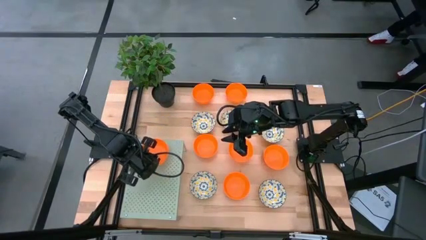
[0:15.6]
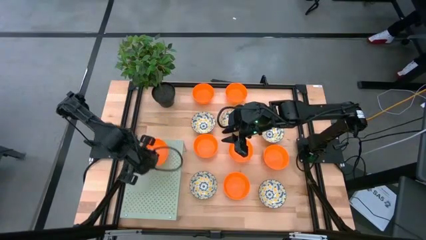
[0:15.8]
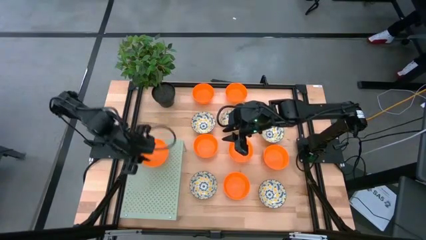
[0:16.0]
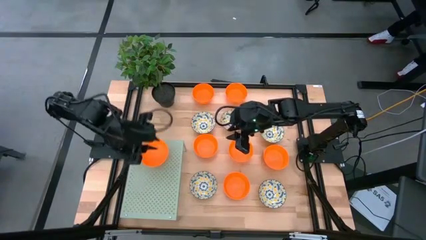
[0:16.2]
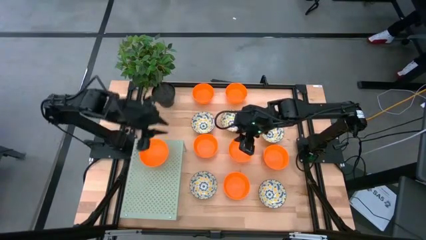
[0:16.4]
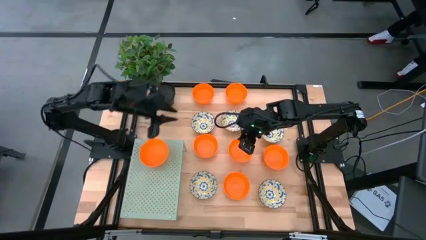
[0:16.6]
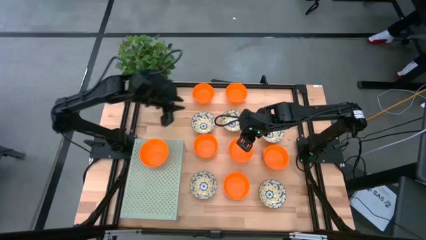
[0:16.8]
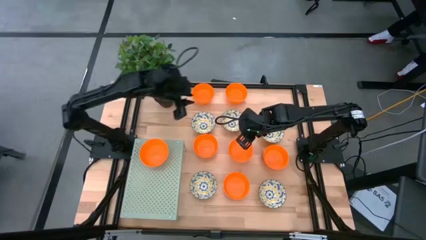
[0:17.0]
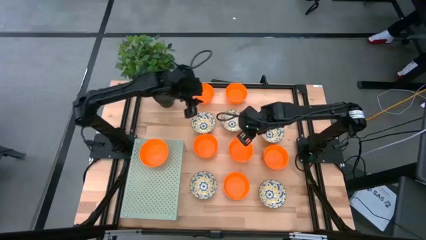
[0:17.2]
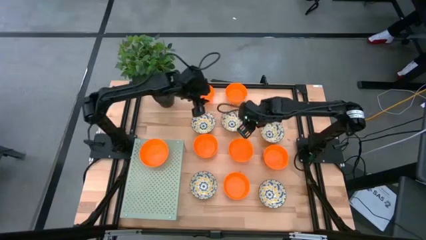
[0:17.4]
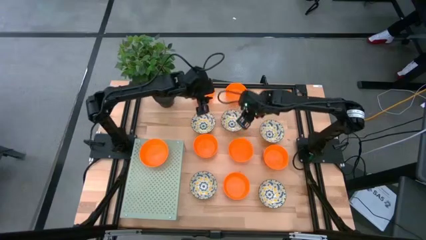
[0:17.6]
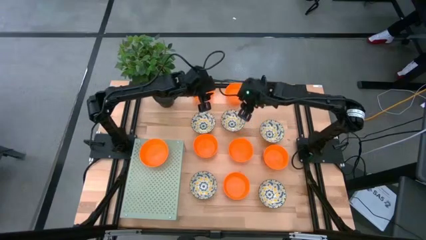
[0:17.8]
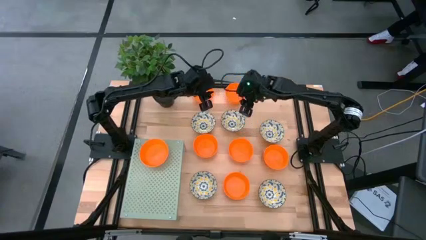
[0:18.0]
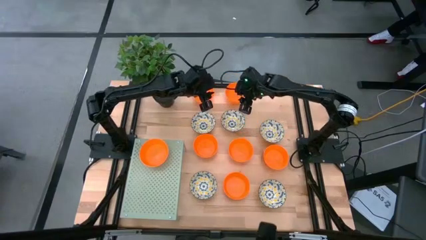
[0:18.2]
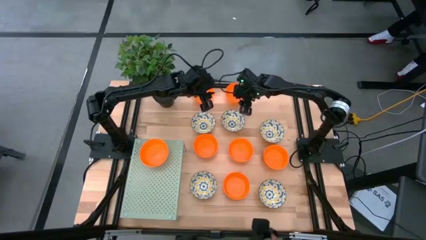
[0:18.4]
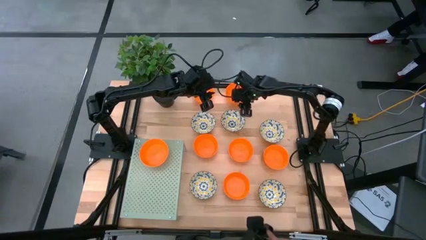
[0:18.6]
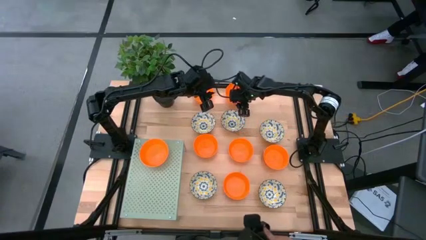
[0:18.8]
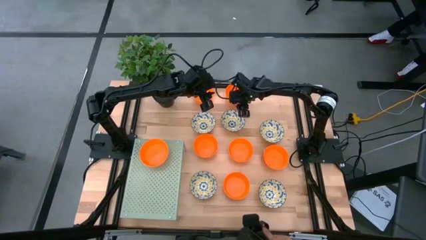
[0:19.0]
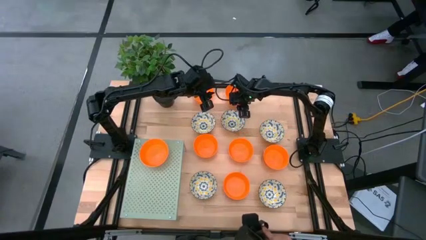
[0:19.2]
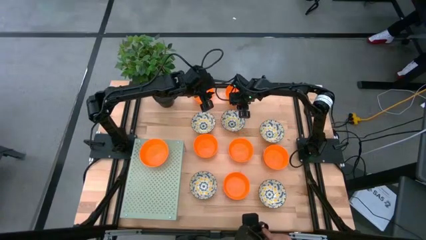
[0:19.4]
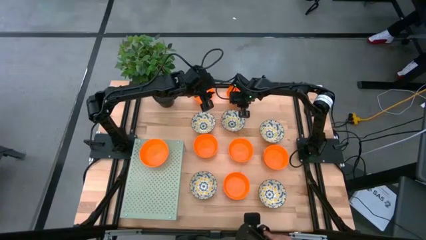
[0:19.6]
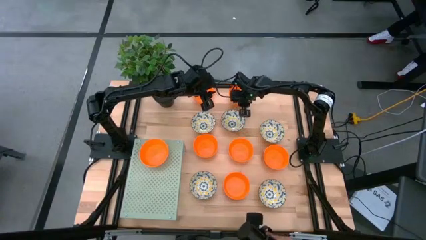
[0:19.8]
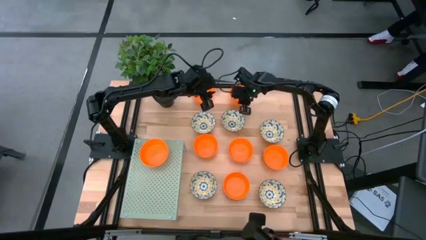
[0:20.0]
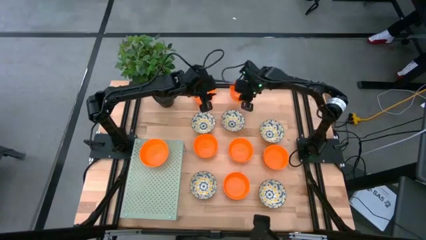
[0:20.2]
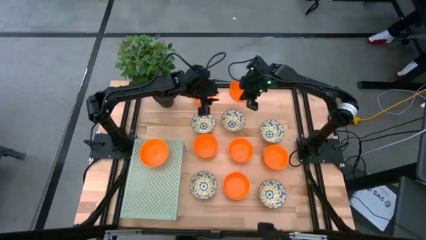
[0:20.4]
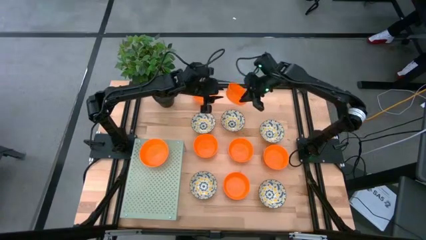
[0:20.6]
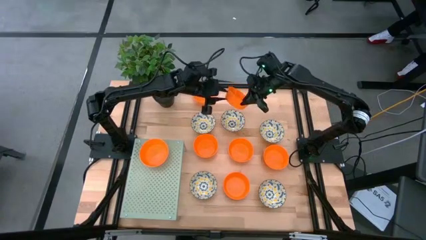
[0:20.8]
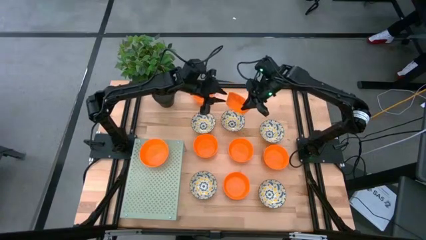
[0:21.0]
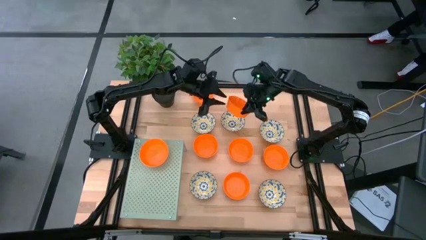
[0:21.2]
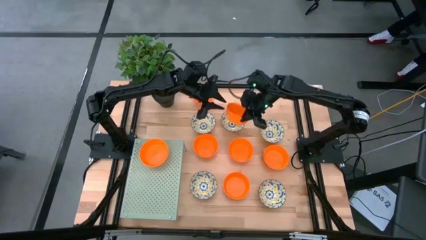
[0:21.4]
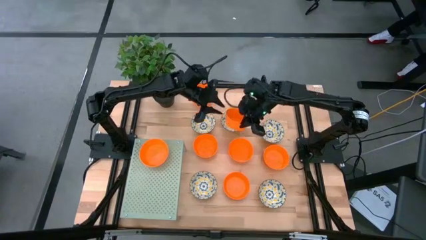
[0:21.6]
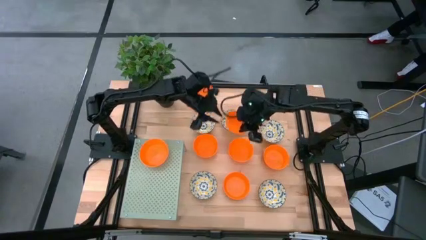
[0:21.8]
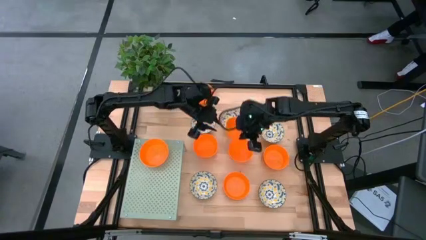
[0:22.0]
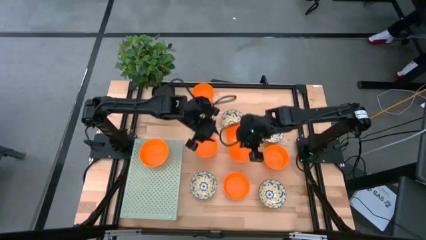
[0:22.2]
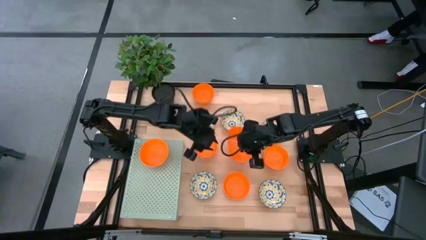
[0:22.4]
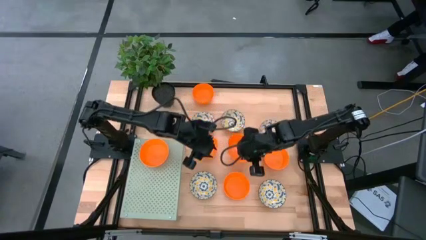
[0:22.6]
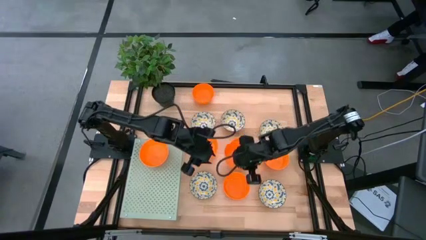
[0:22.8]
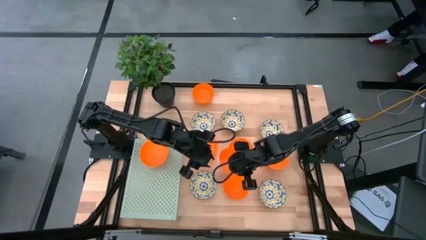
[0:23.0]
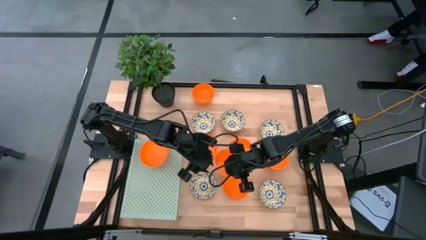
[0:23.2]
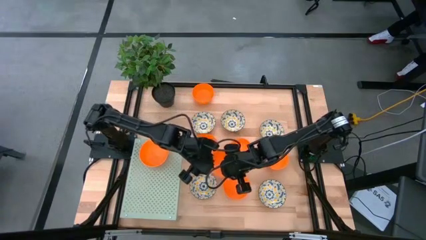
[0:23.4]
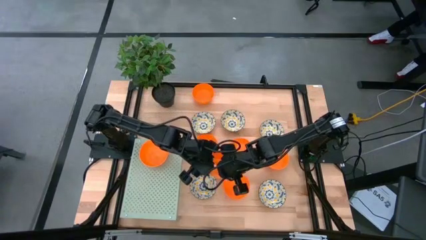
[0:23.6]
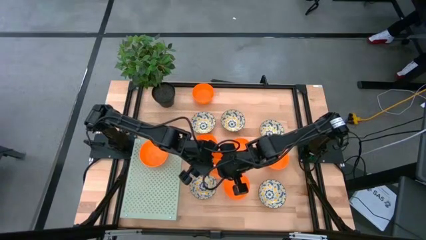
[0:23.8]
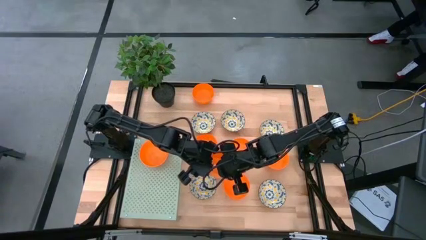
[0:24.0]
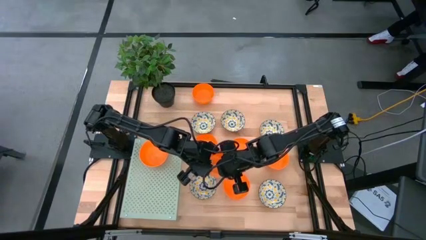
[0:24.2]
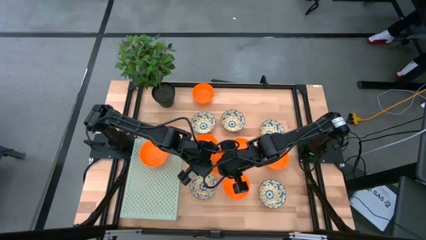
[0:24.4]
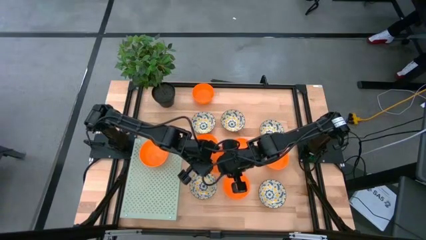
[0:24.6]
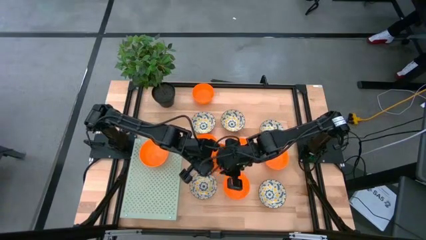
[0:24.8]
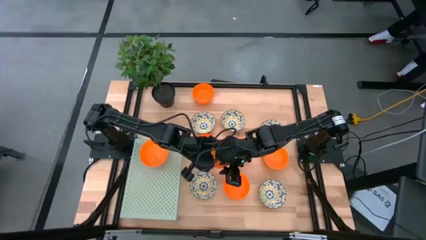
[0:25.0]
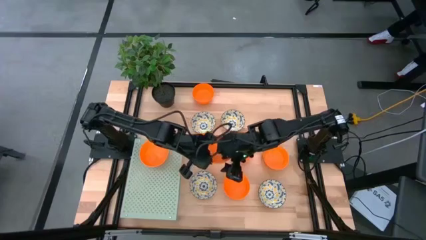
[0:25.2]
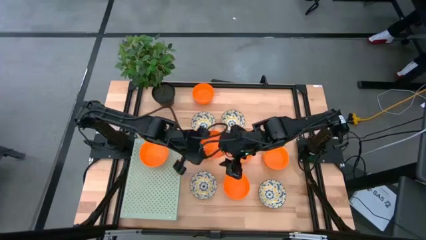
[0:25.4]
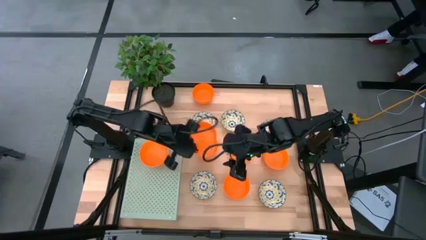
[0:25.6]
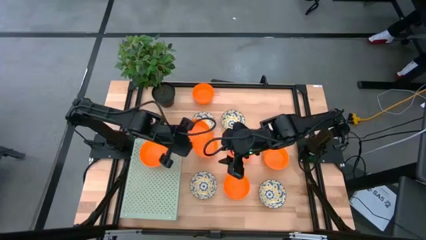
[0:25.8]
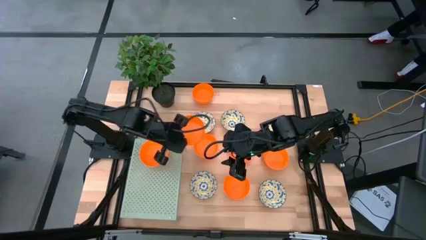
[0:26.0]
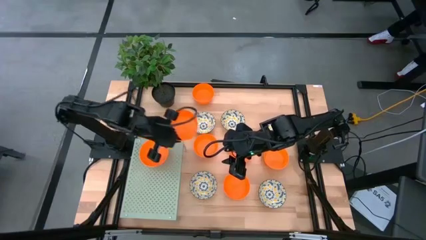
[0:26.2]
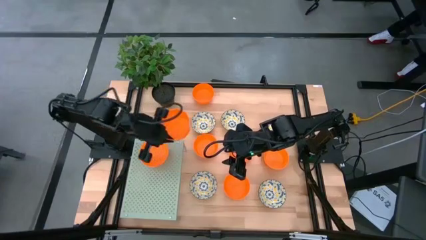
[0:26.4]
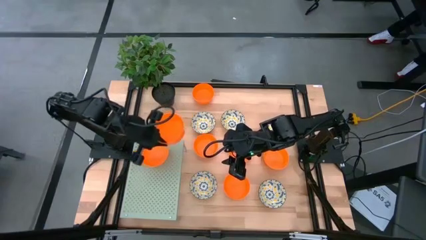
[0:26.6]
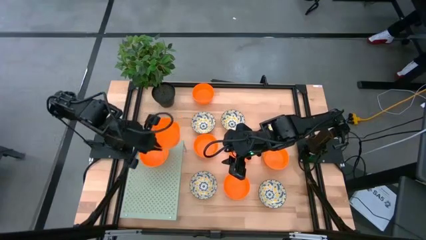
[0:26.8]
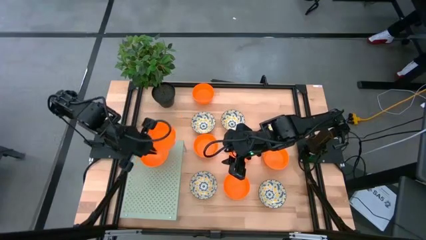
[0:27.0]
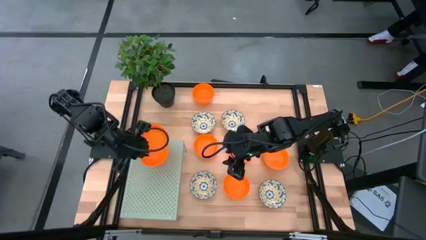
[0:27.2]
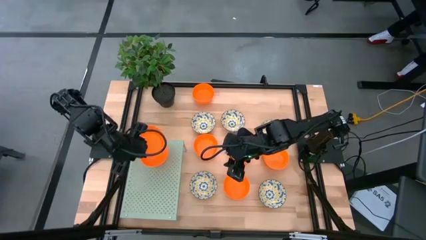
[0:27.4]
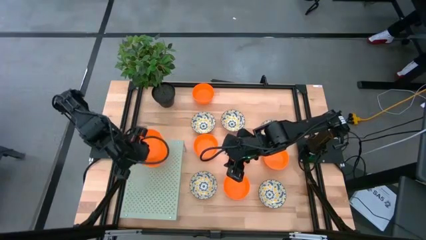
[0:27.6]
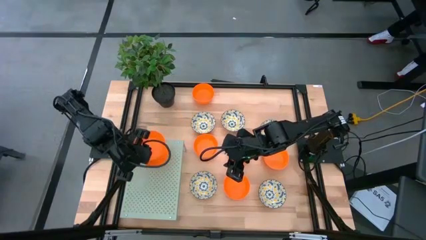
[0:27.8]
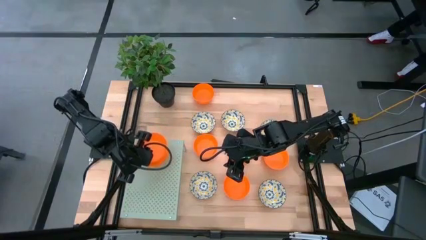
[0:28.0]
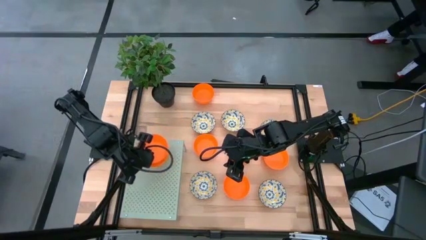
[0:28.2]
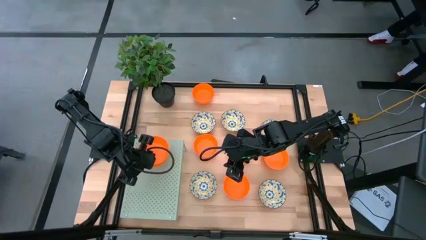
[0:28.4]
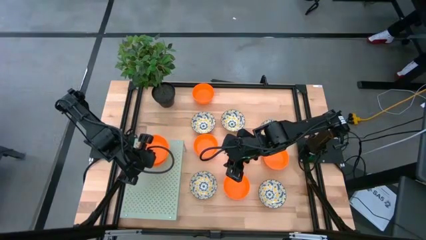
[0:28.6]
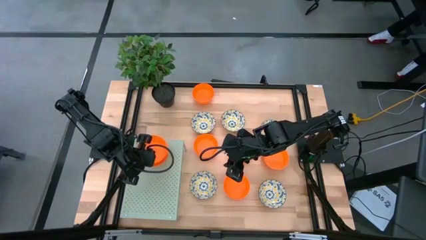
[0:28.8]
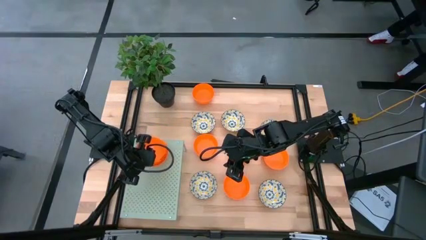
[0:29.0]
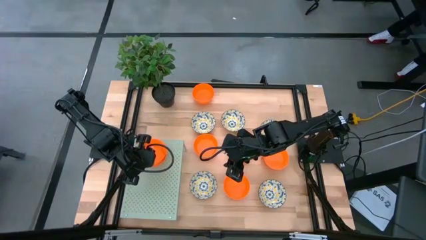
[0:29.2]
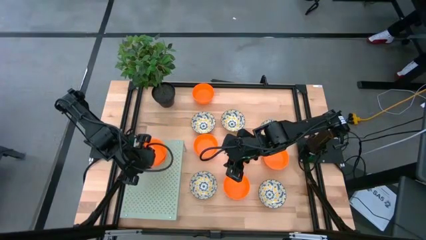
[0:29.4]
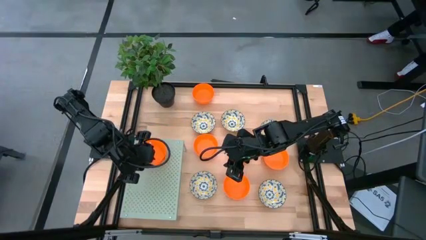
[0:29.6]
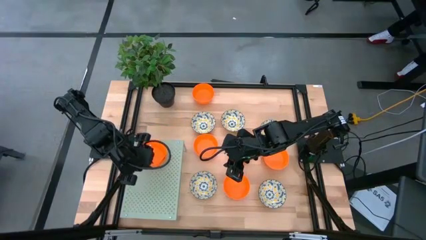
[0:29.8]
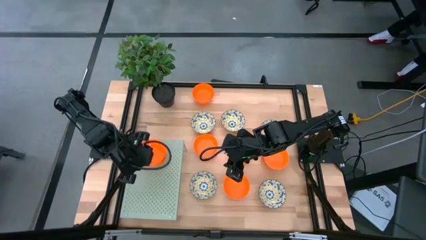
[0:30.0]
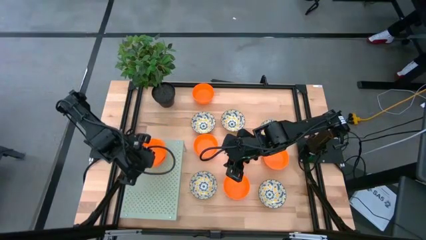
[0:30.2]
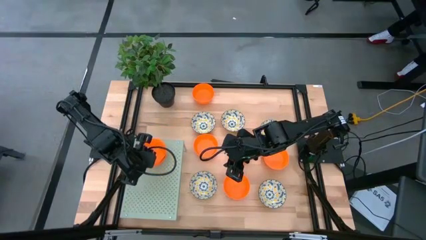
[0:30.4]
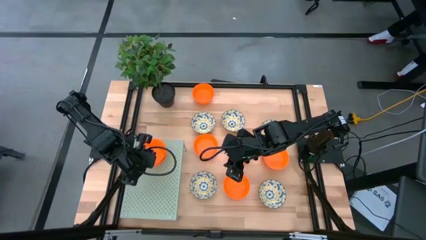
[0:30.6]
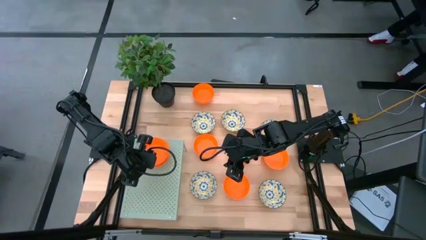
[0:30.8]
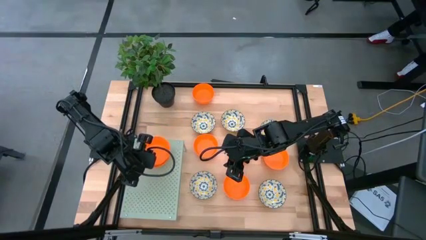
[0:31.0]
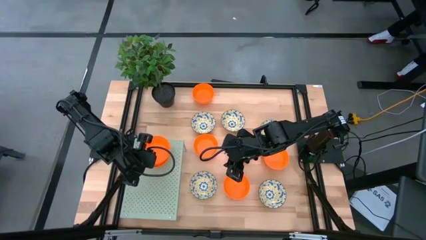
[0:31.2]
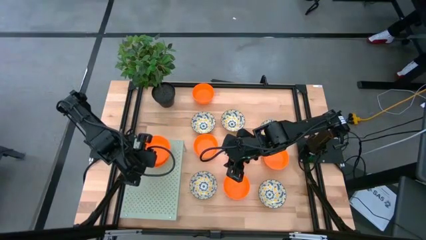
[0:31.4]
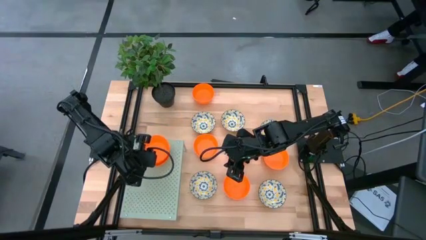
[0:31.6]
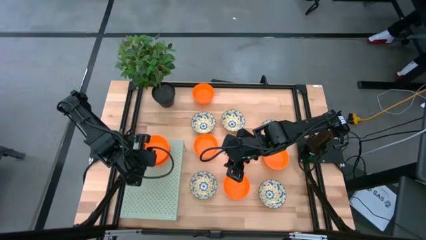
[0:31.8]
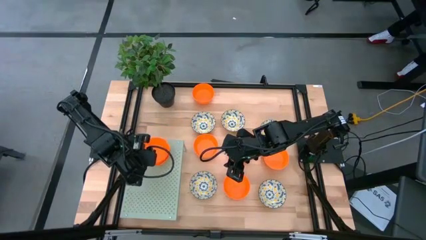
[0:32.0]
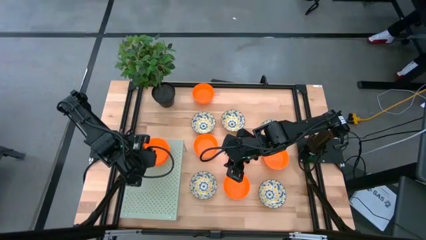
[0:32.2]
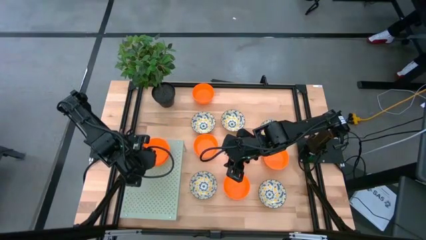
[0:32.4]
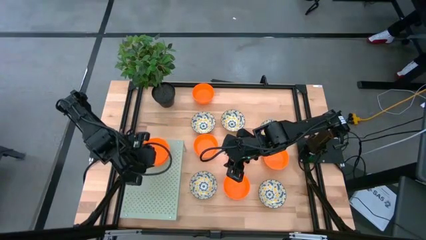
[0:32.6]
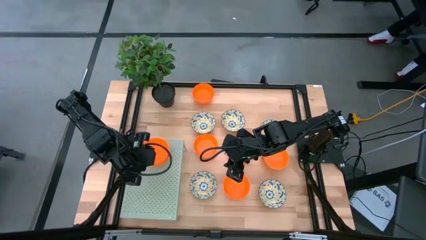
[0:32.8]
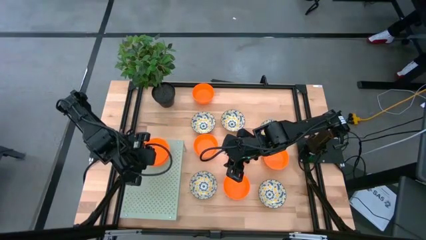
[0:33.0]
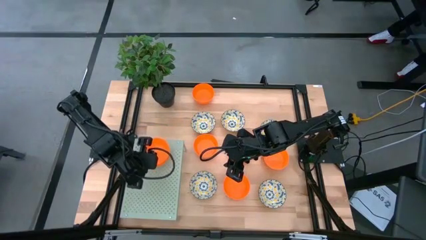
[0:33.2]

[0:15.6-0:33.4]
Task: Pick & Place Mini bowls
Stack the orange bowl on top of the orange bowl on the shelf

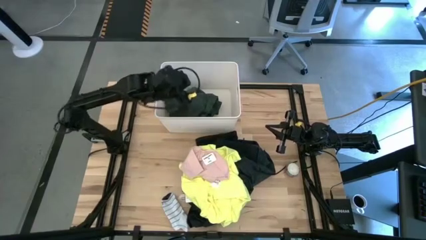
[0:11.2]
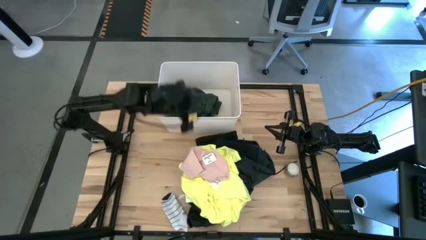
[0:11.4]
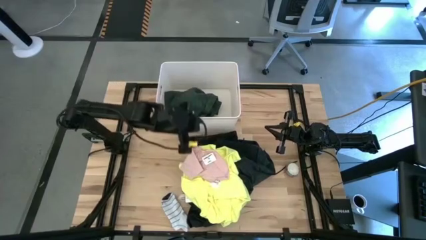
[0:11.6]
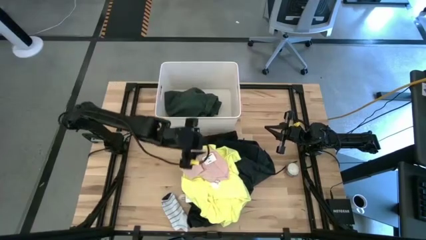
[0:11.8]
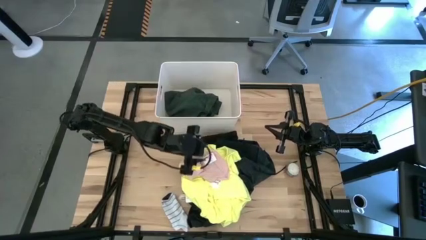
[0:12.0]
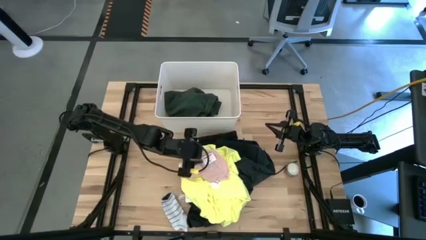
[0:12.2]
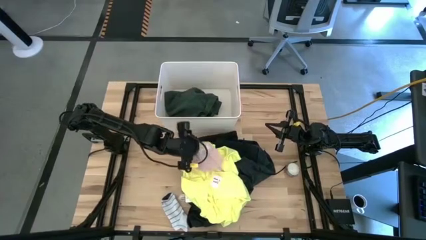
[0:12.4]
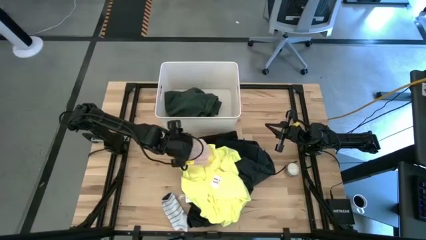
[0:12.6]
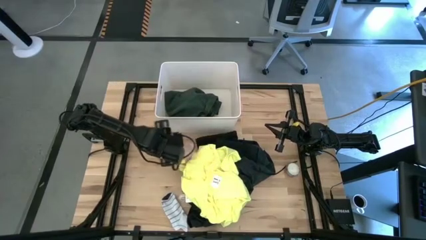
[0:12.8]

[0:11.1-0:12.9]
Task: Sort clothes
Move the pink panty to the middle left of the table
